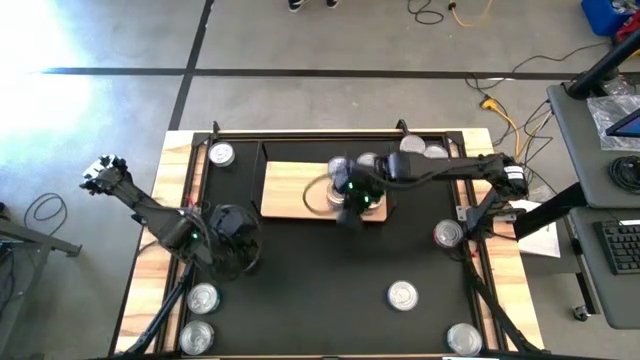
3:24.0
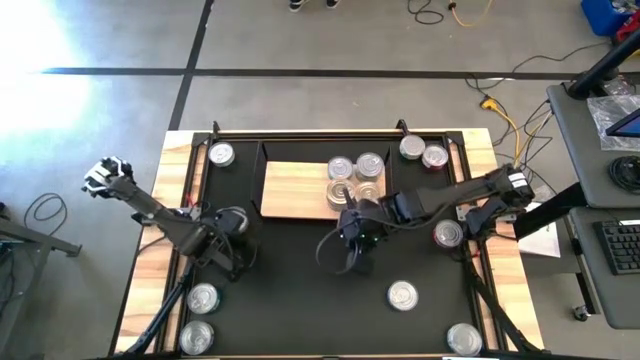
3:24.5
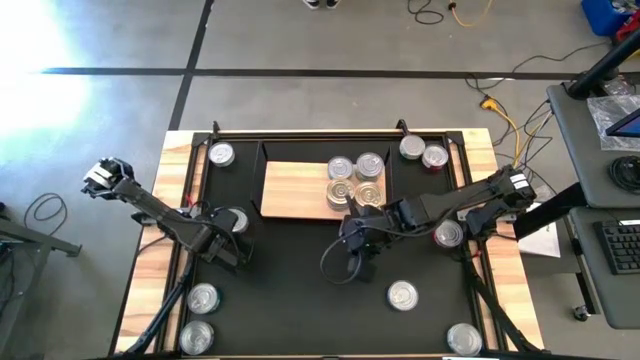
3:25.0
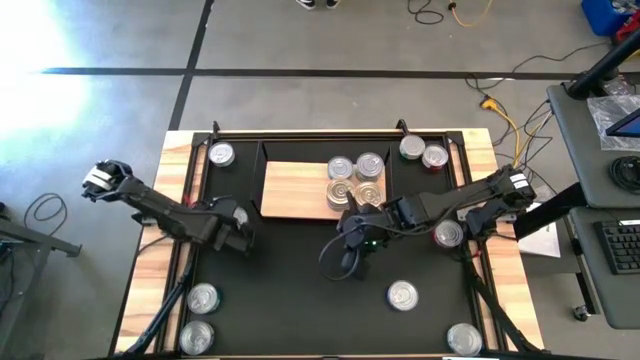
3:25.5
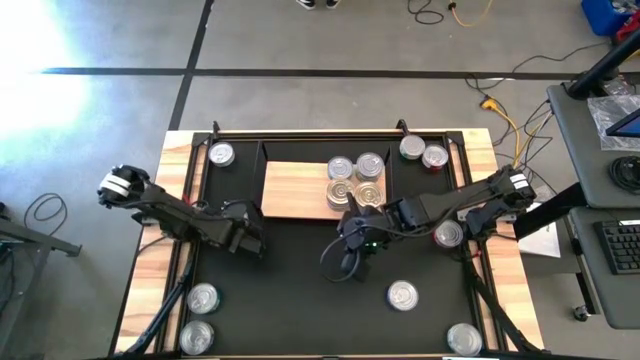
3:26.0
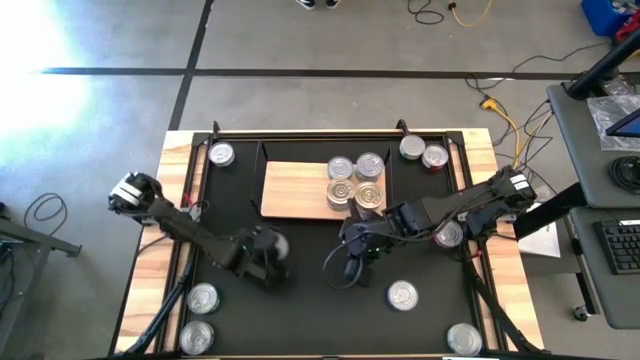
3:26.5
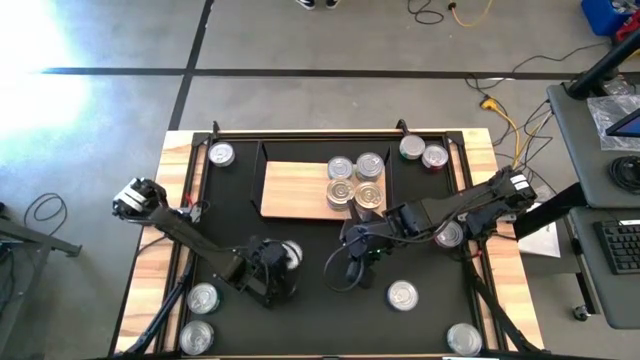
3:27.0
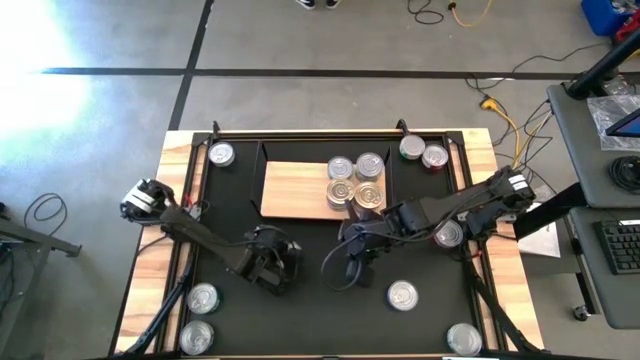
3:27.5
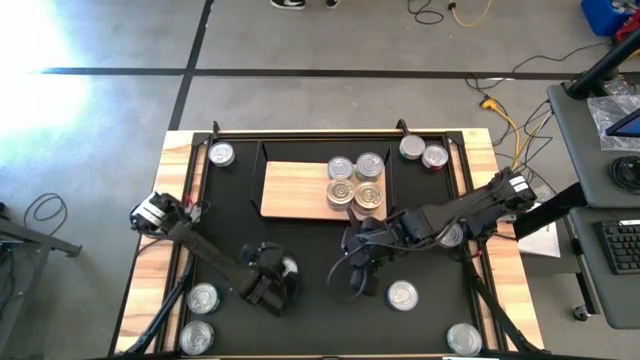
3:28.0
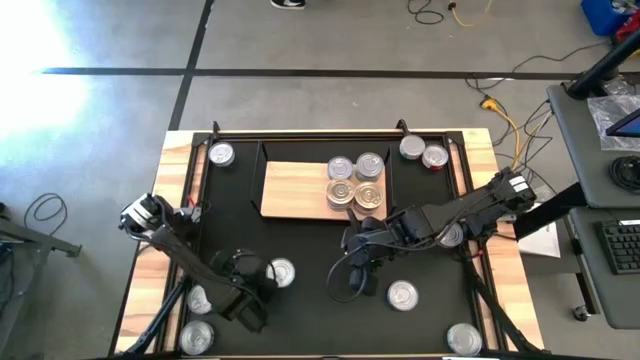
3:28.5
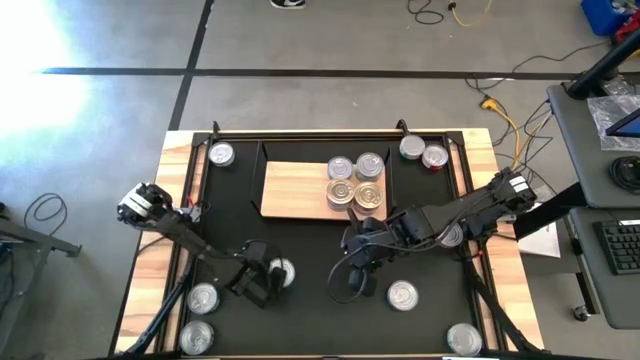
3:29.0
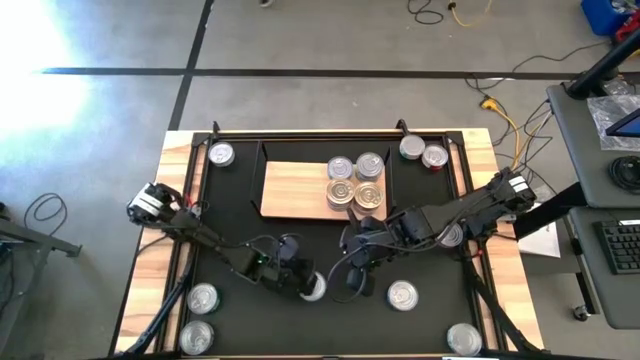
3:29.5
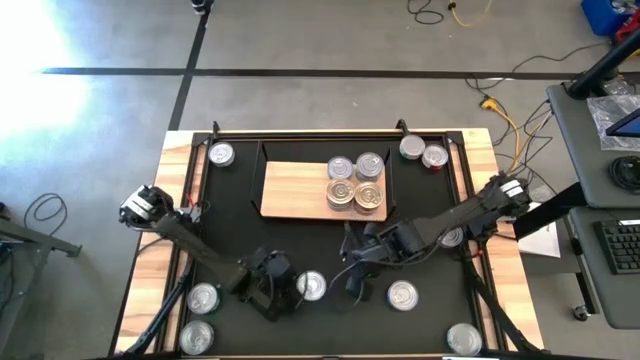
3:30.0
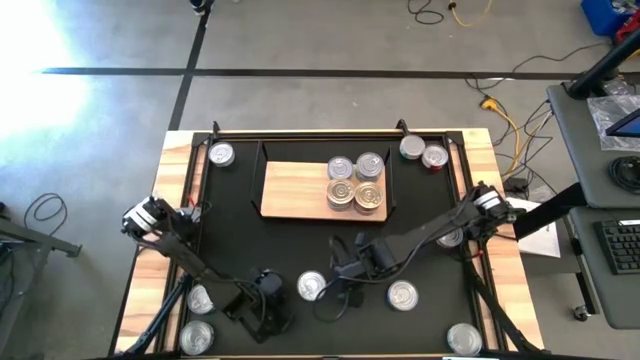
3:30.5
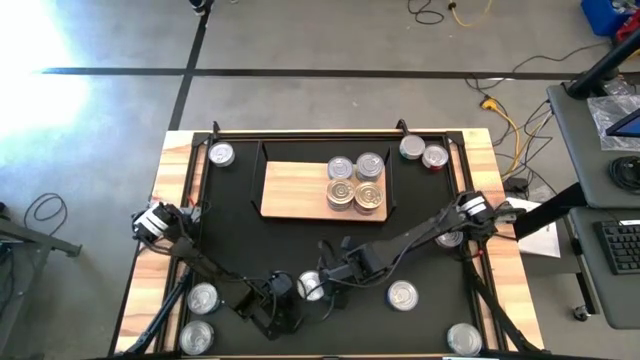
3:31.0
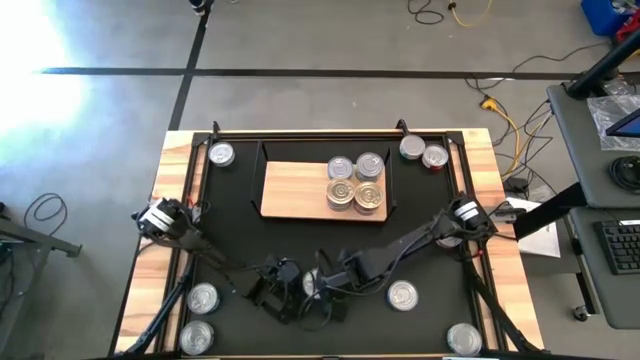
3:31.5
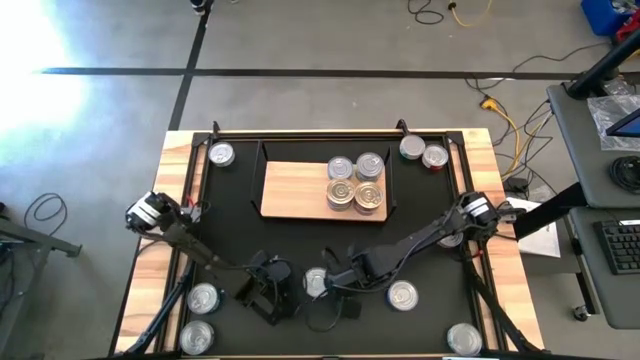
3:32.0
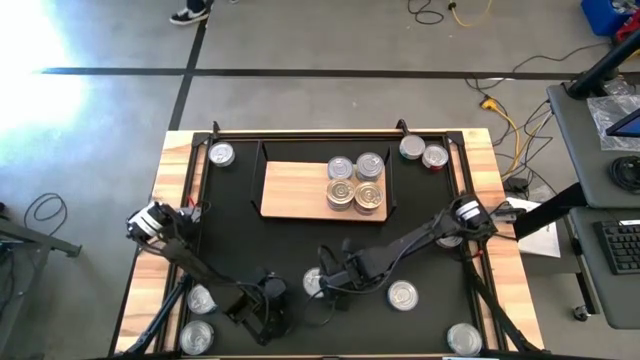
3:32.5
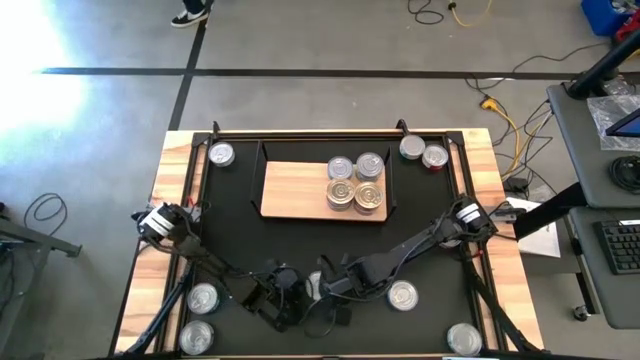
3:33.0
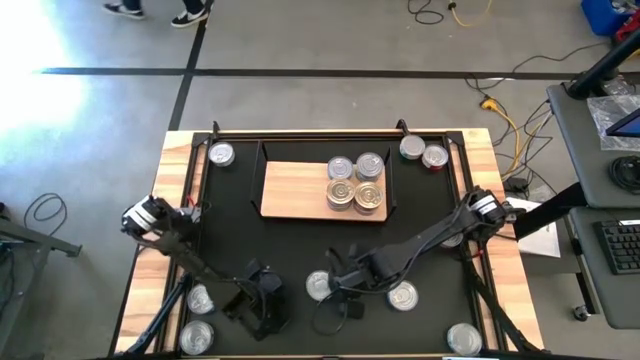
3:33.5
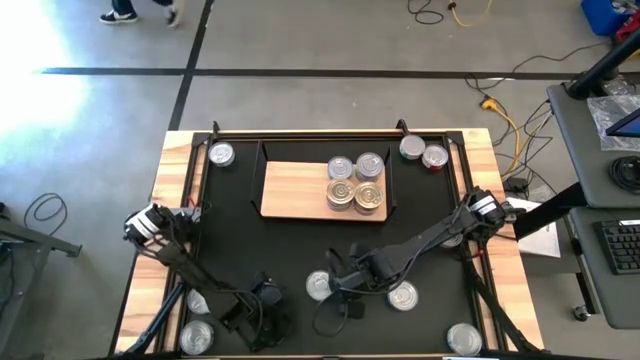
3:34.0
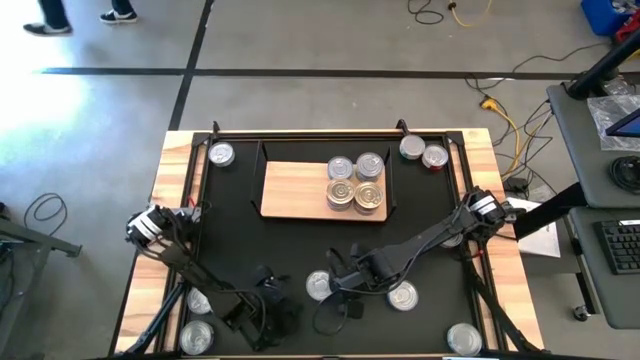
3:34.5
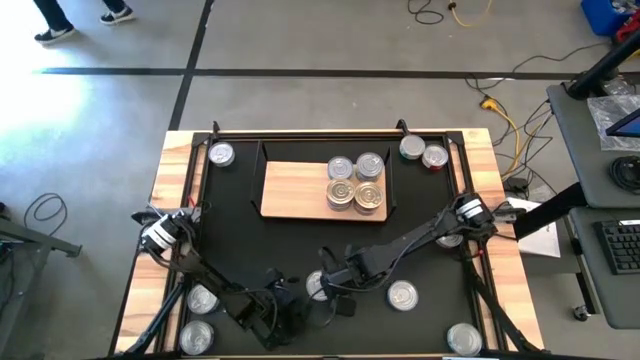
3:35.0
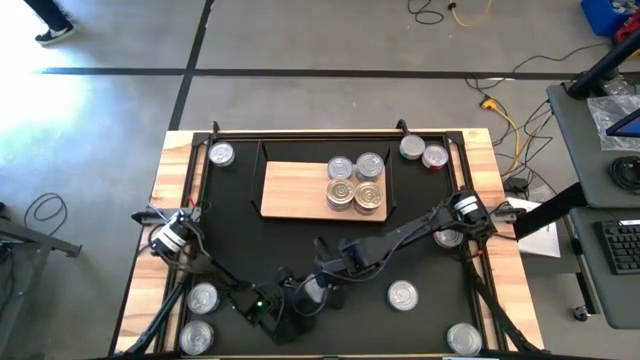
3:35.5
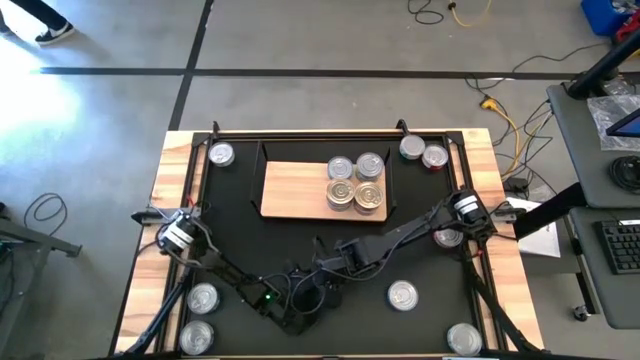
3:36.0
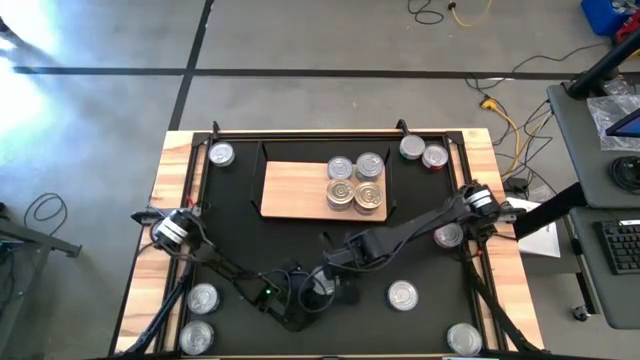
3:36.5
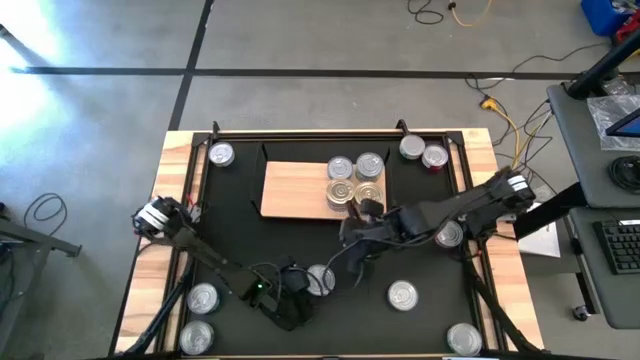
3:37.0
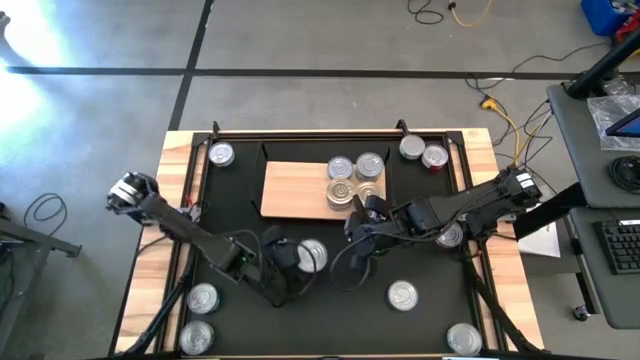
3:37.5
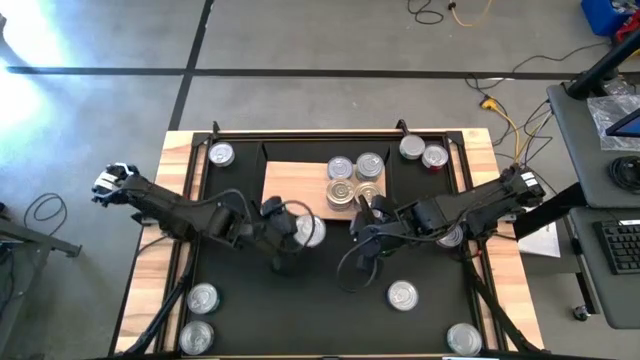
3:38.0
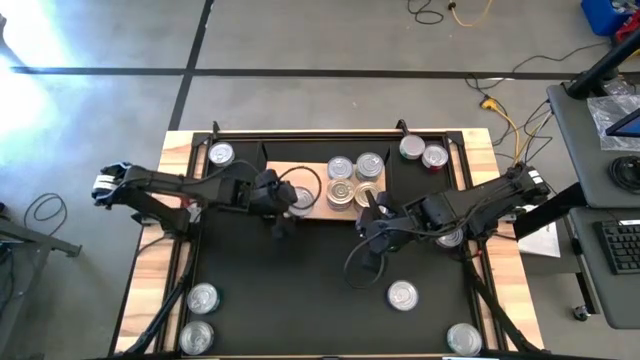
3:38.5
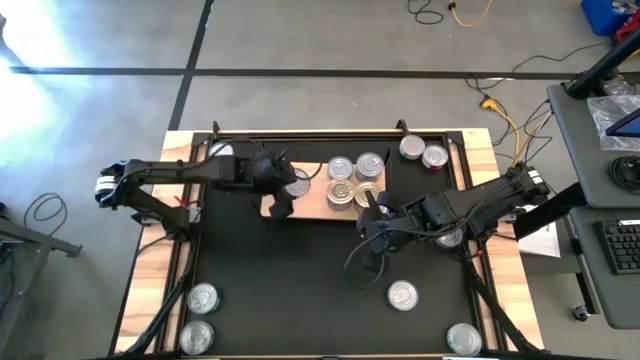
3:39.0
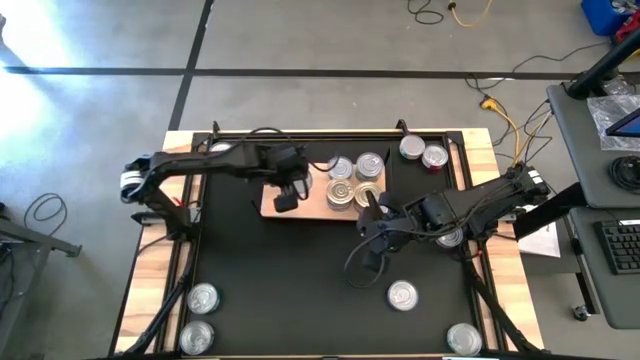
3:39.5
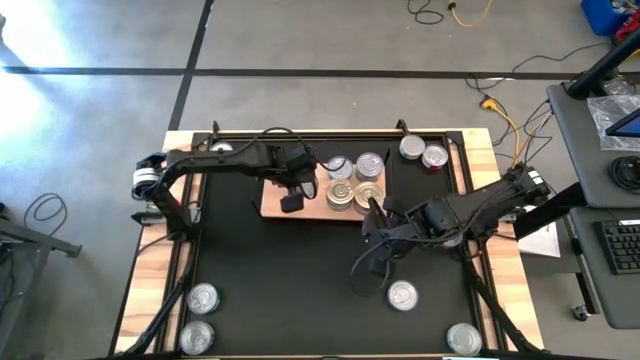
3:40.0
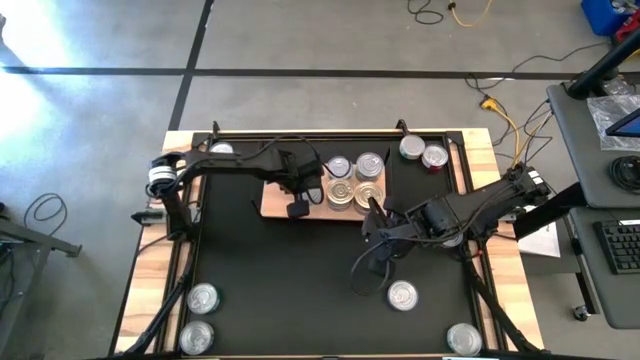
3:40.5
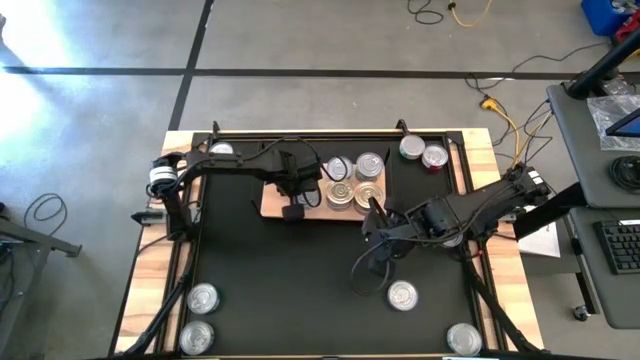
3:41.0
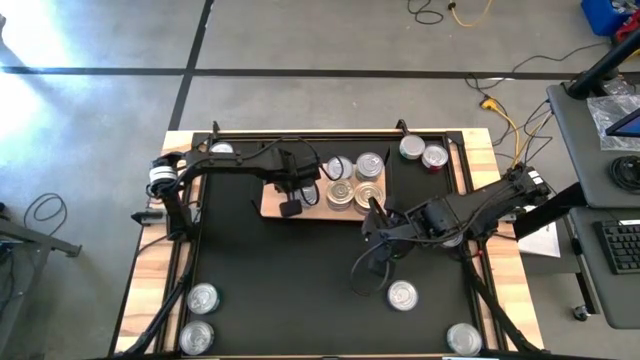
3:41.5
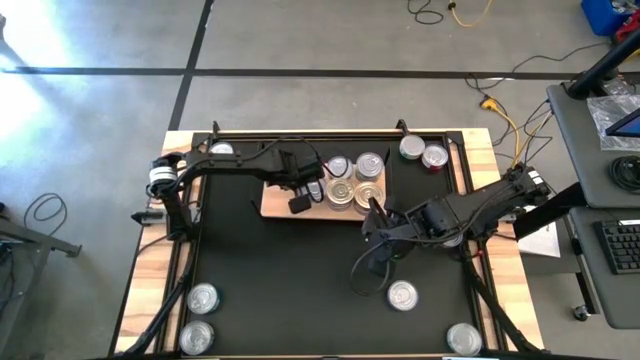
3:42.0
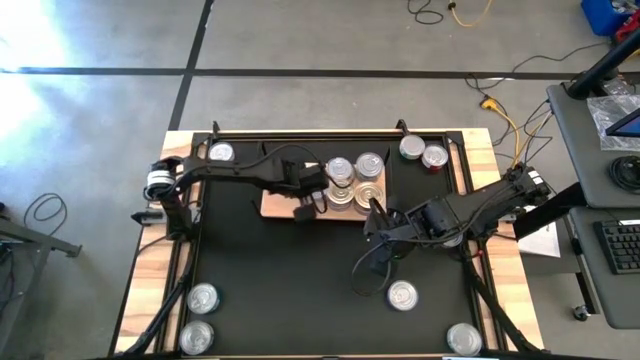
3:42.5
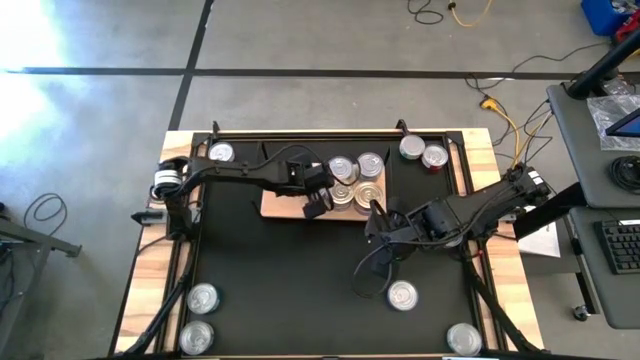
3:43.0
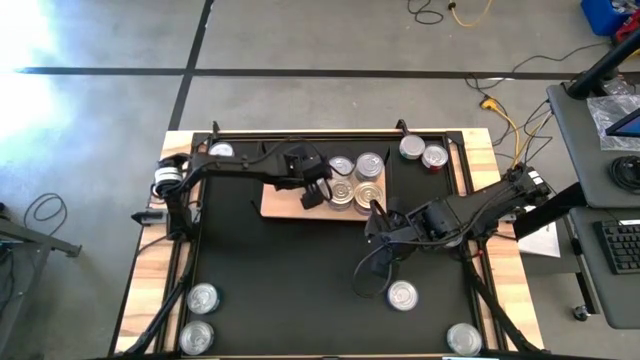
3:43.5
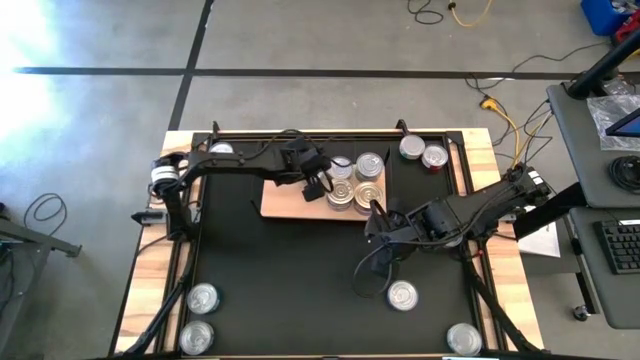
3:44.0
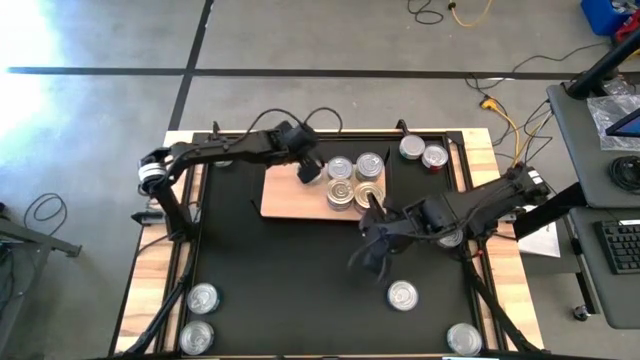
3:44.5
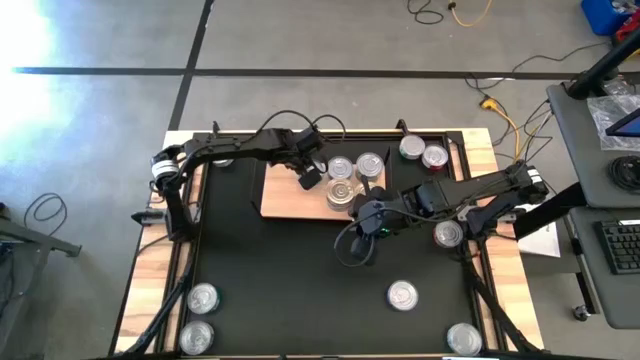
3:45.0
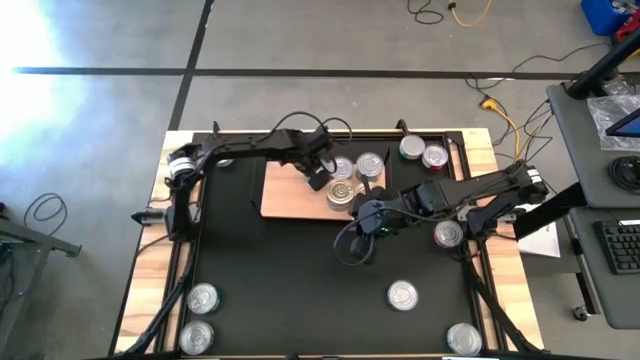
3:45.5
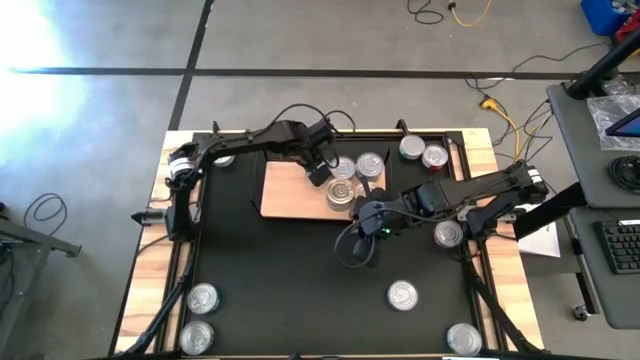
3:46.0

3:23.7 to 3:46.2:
Task: Stack canned seafood by type on shelf
Put the middle left light blue tuna can on the shelf
